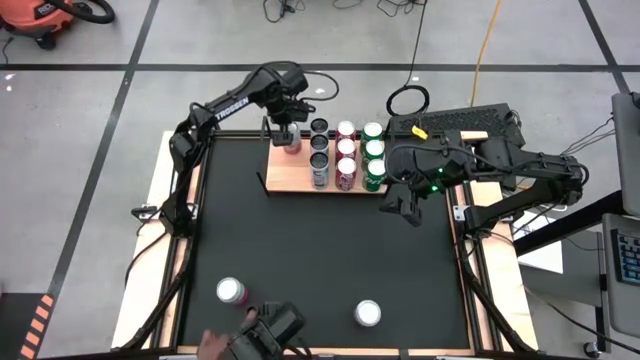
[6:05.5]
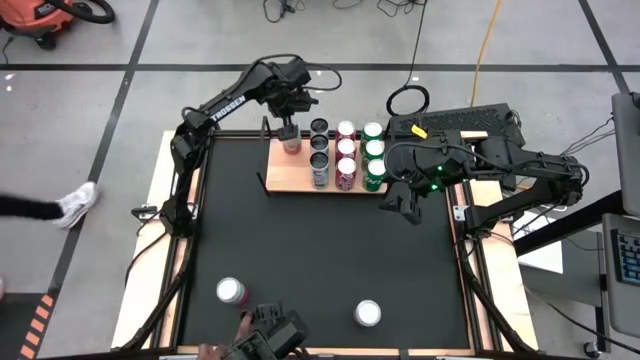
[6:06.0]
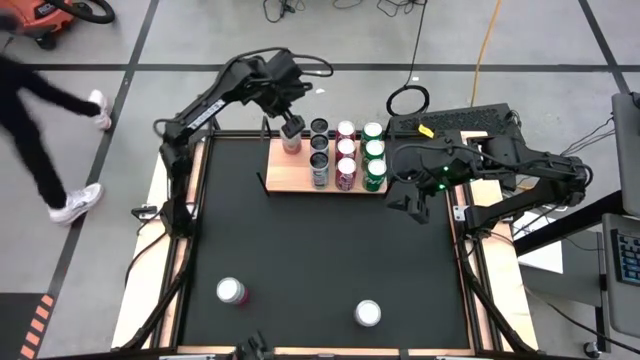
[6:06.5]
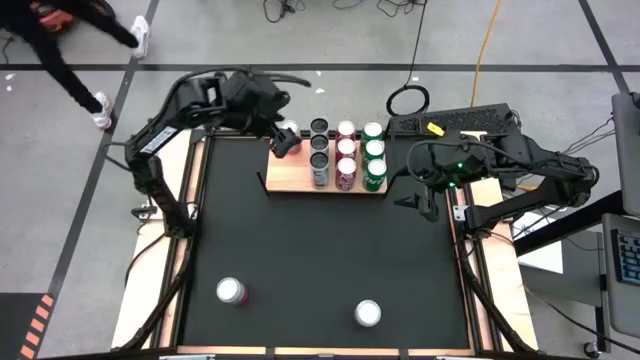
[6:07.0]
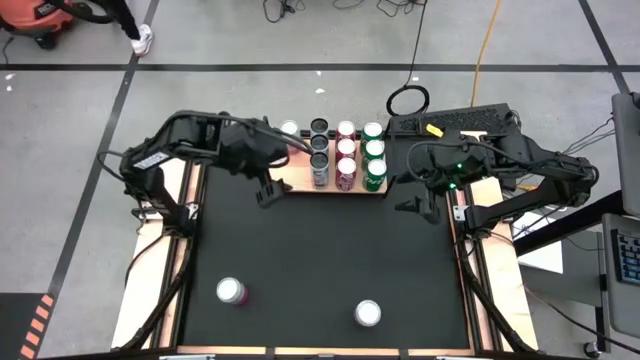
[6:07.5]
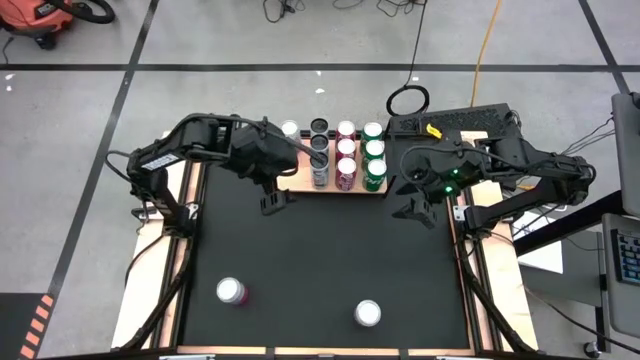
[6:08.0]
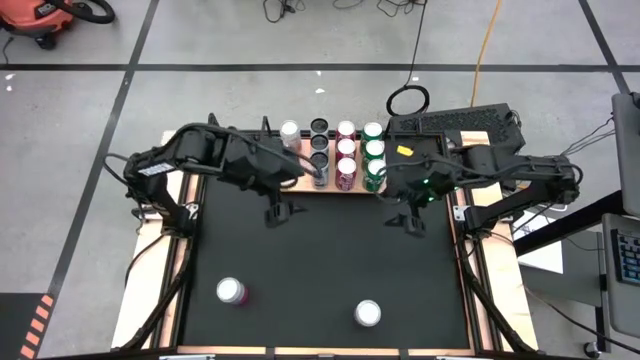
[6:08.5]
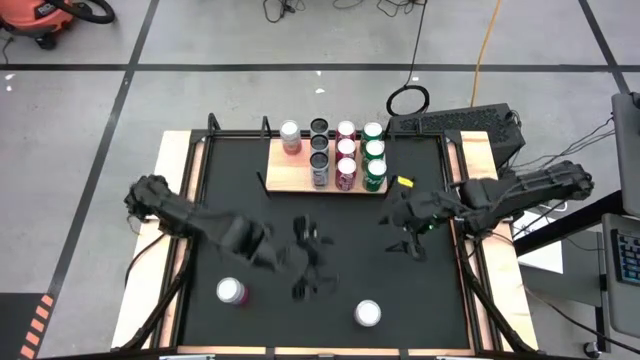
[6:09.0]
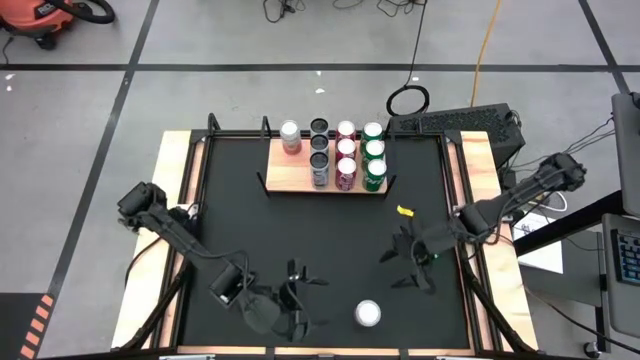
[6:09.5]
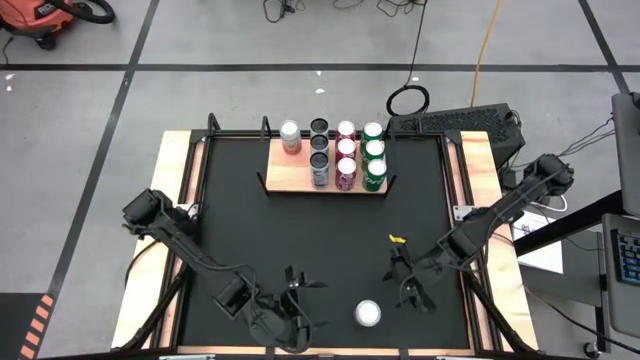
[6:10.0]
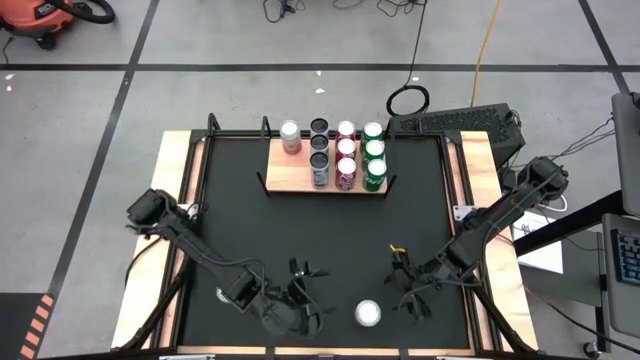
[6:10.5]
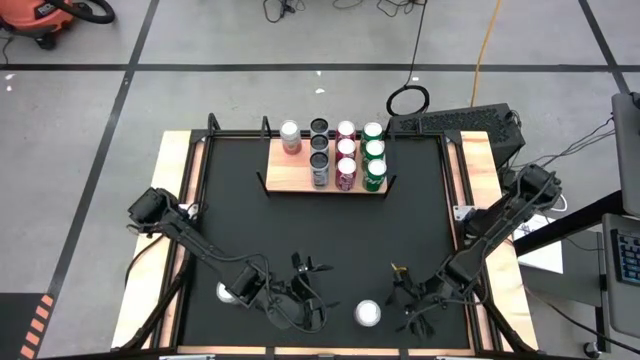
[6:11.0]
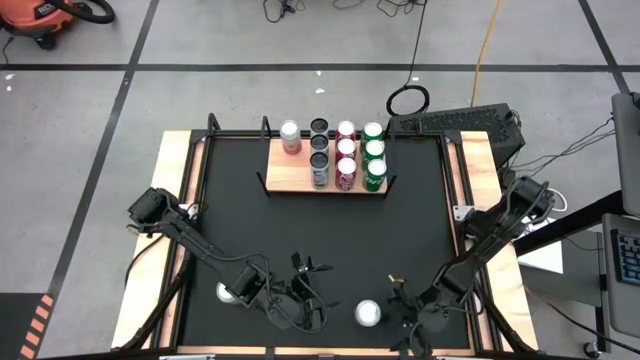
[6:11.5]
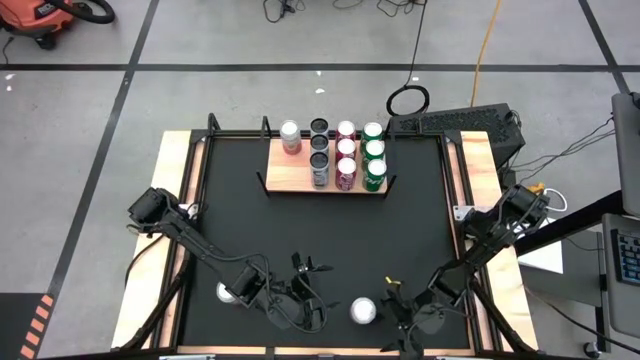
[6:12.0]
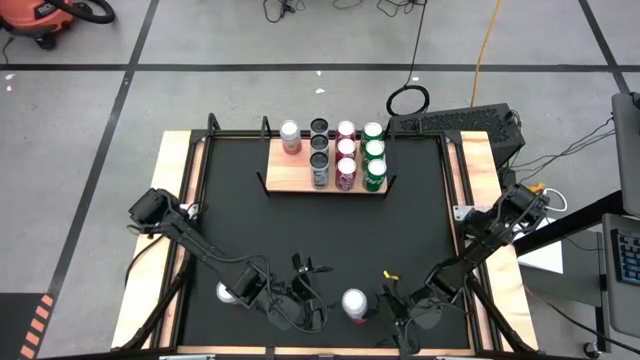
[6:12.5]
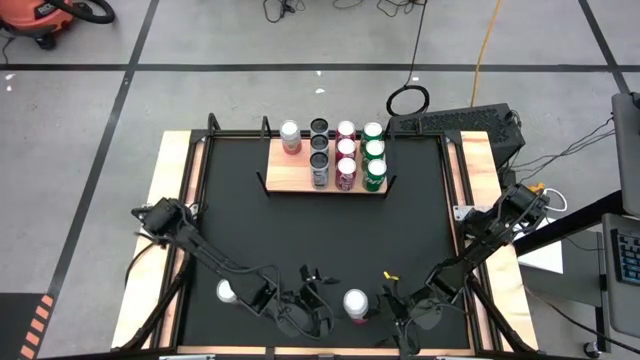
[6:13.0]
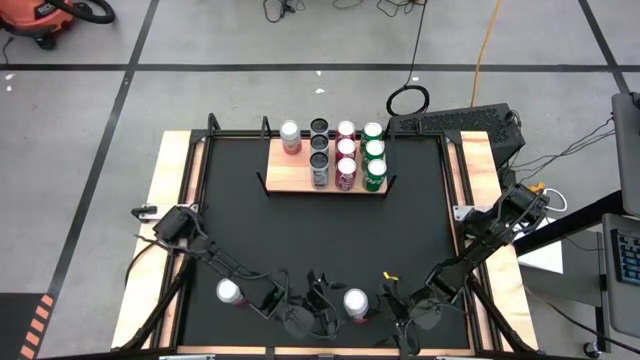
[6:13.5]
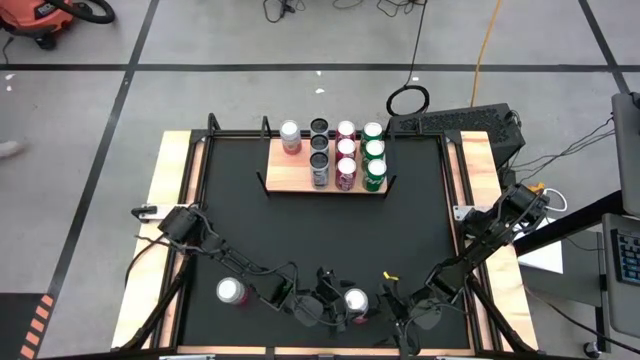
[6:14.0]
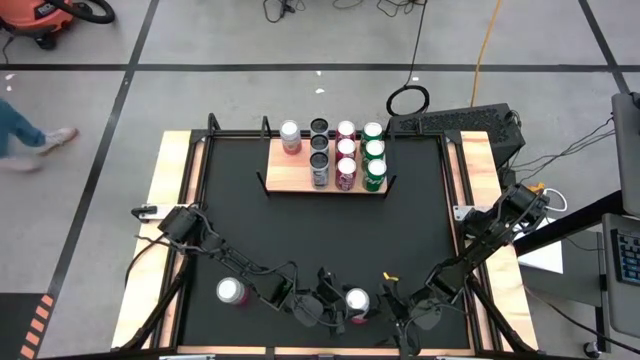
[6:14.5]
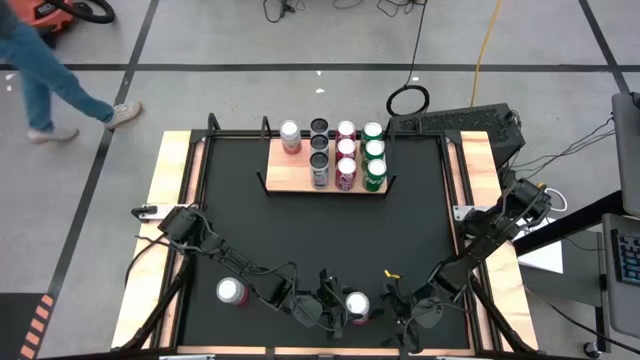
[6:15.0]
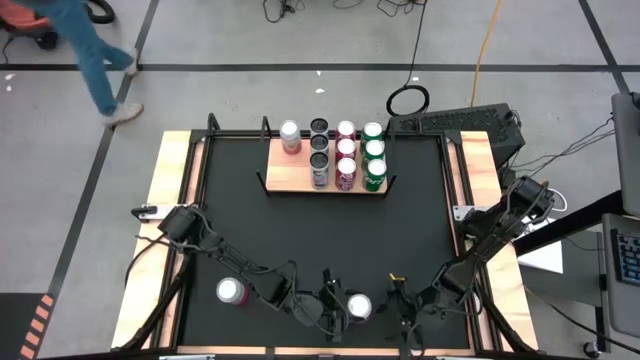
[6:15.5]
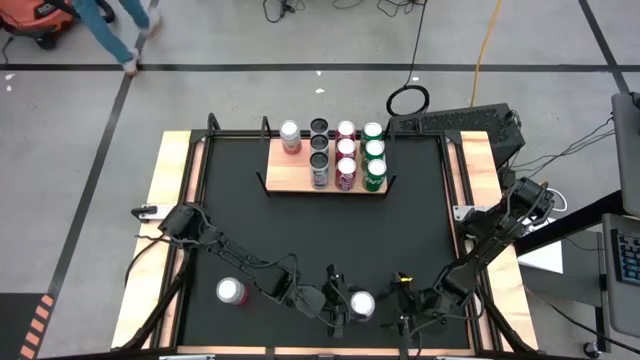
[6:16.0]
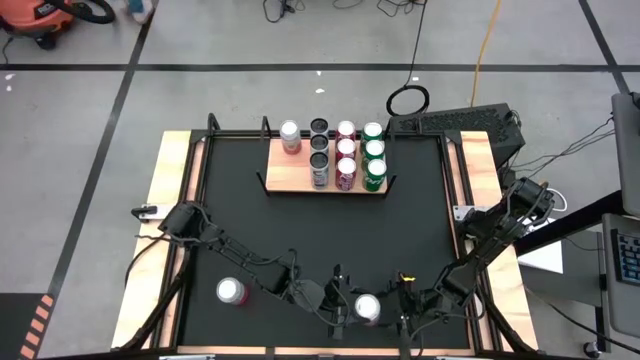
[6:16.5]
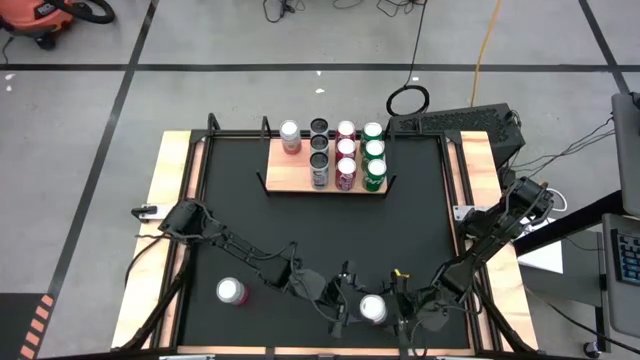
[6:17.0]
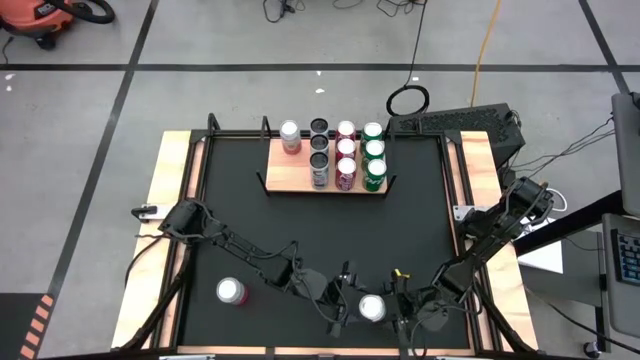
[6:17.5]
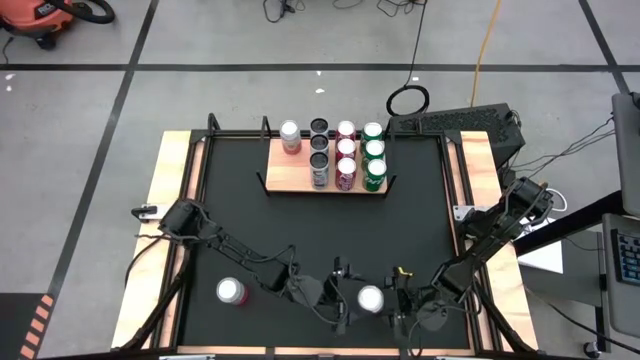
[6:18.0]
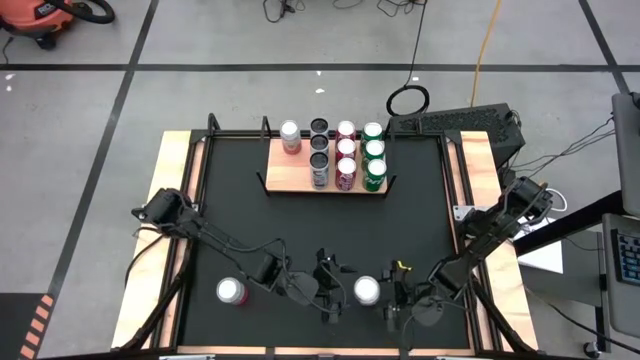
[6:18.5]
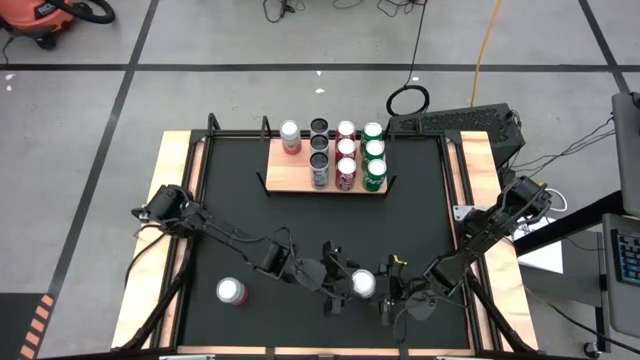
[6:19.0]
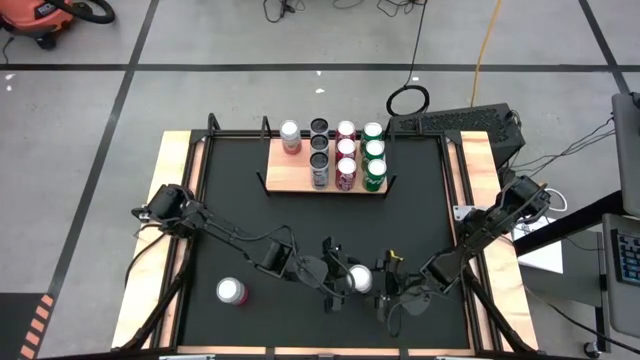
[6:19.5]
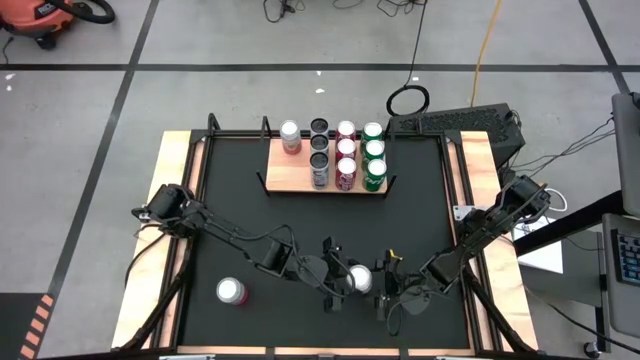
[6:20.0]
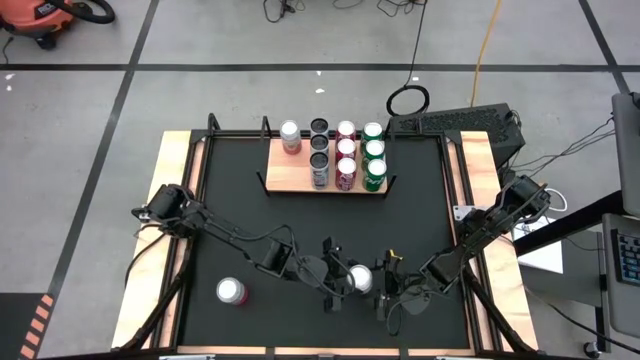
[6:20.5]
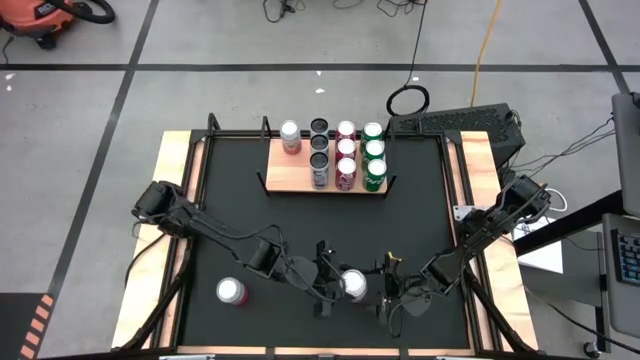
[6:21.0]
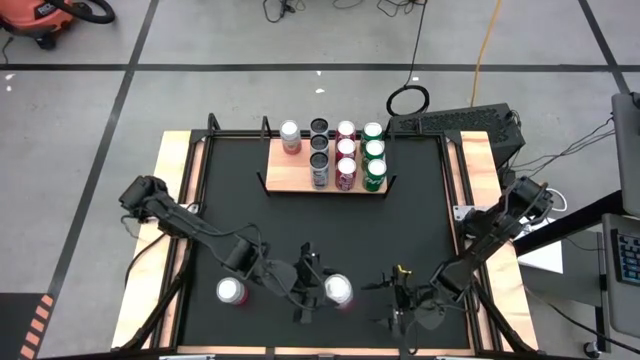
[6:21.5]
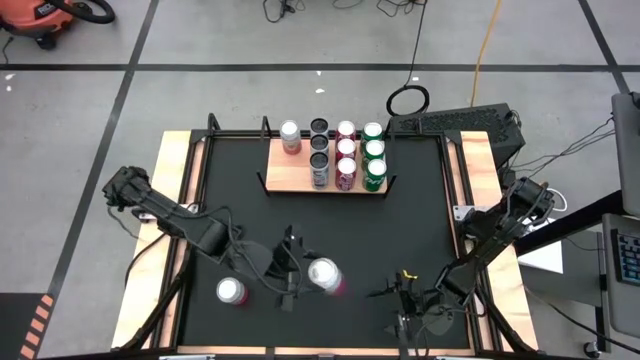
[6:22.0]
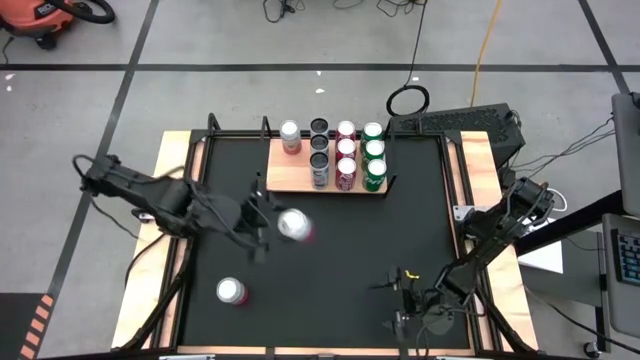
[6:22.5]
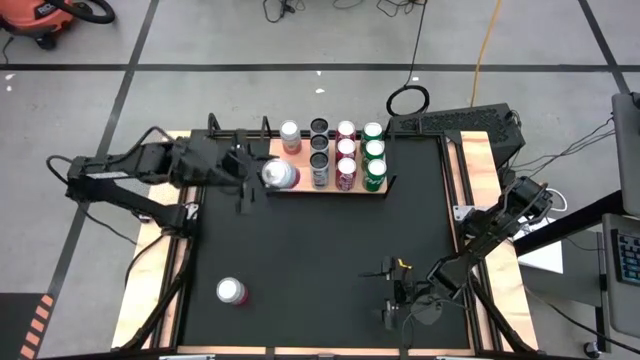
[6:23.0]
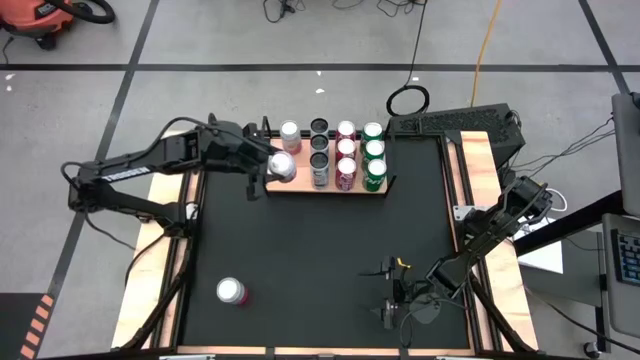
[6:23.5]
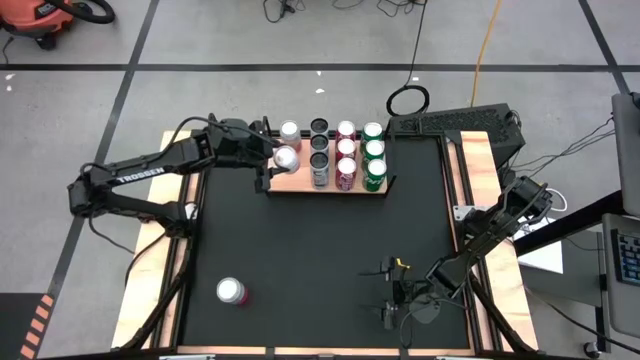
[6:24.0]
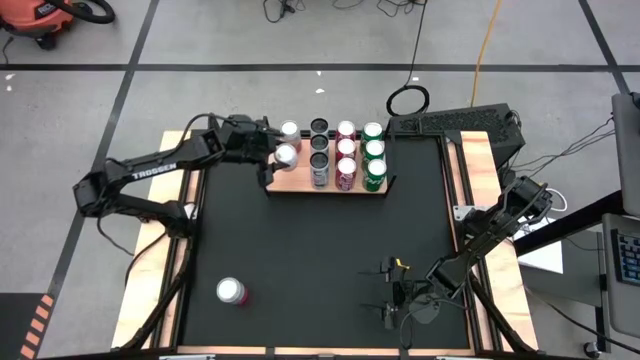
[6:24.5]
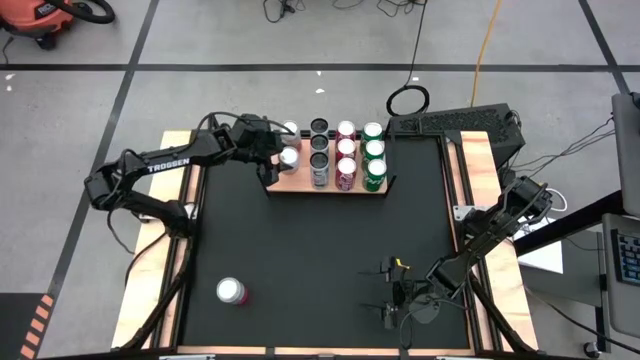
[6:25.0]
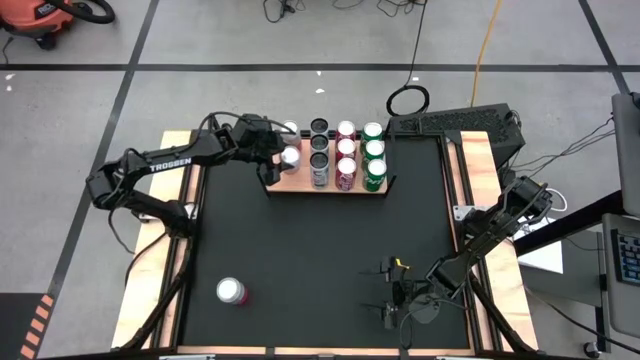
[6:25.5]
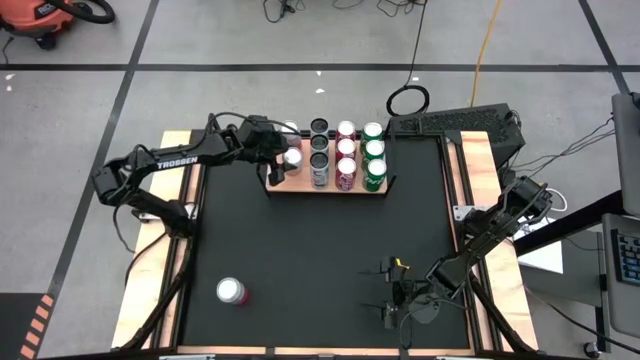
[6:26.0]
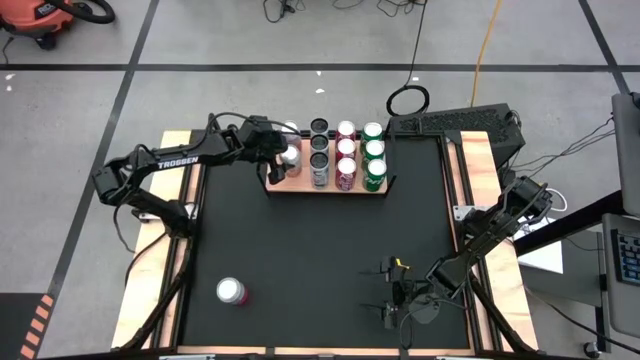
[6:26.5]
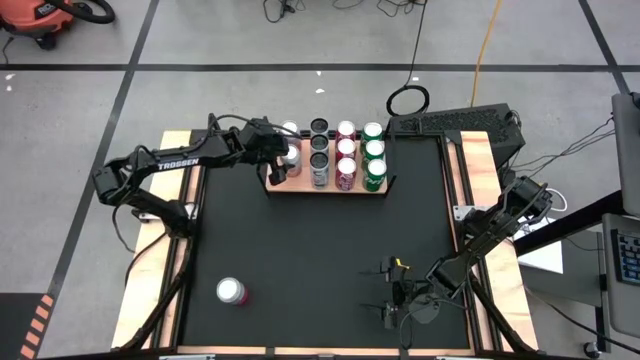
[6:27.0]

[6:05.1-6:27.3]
Task: Place canned beverage on shelf
Put the right pink soda can on the shelf
